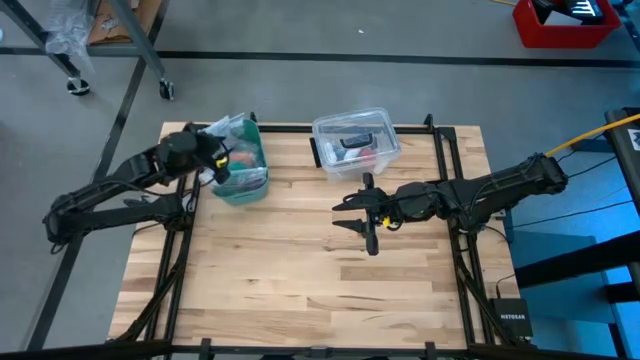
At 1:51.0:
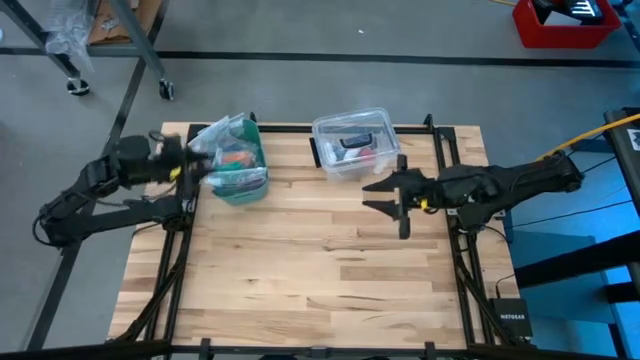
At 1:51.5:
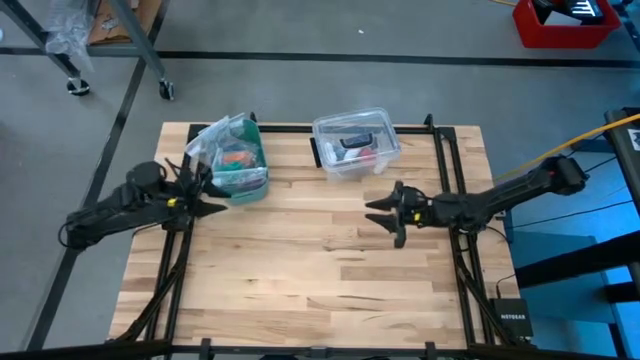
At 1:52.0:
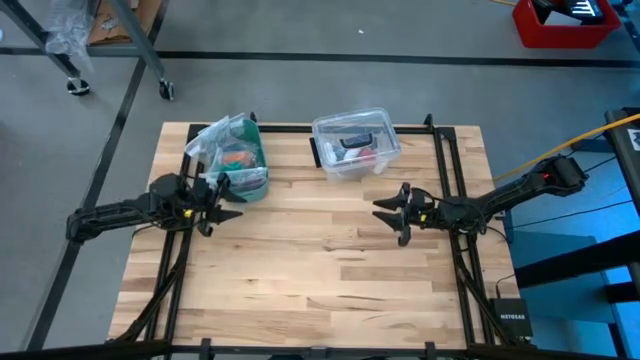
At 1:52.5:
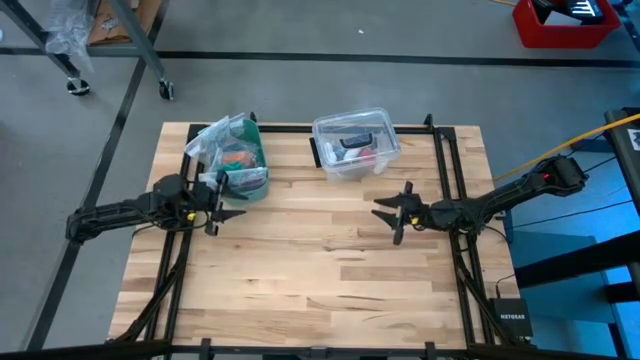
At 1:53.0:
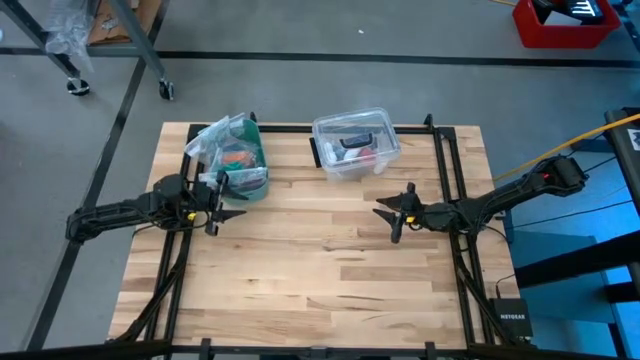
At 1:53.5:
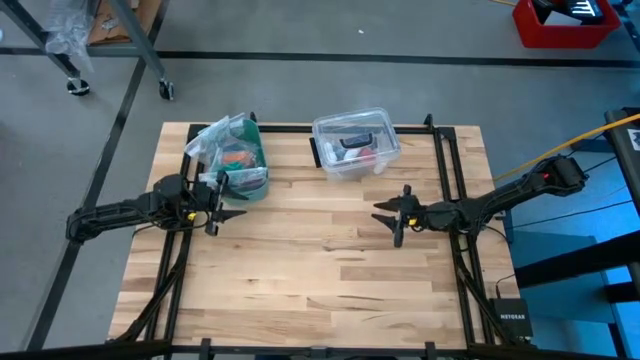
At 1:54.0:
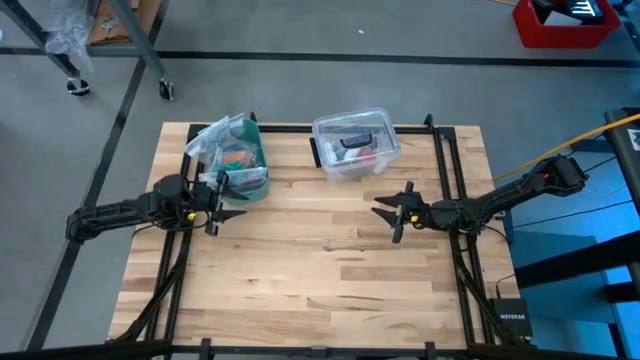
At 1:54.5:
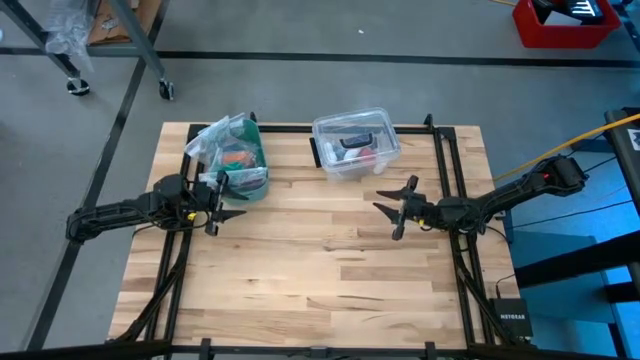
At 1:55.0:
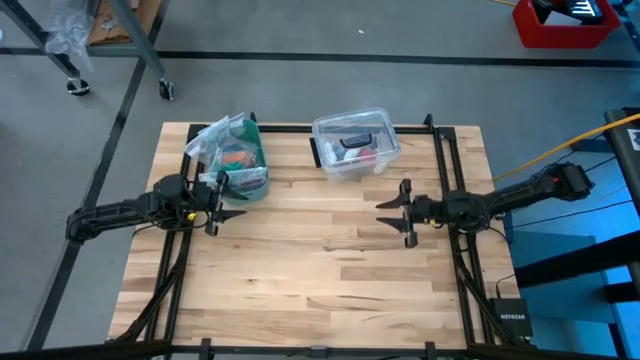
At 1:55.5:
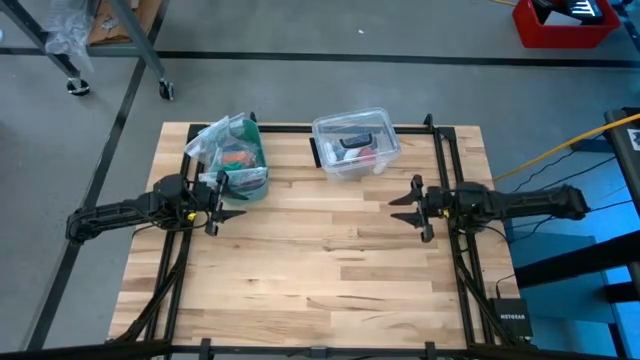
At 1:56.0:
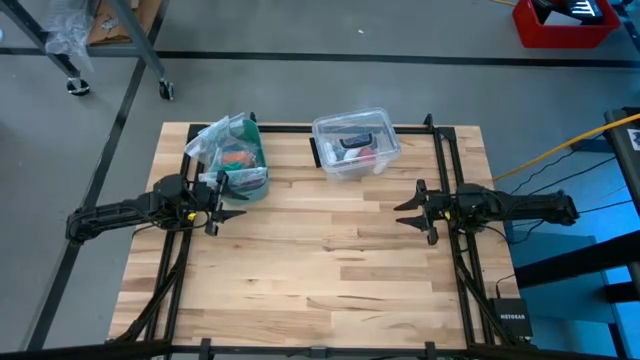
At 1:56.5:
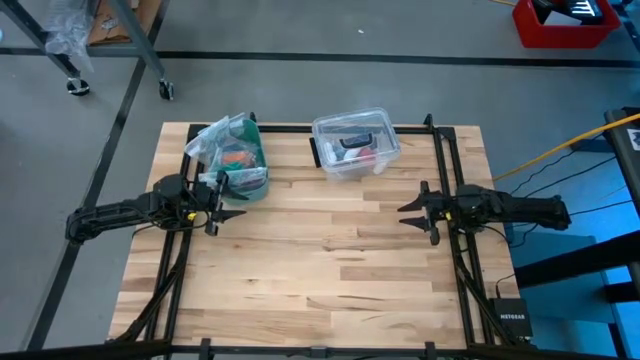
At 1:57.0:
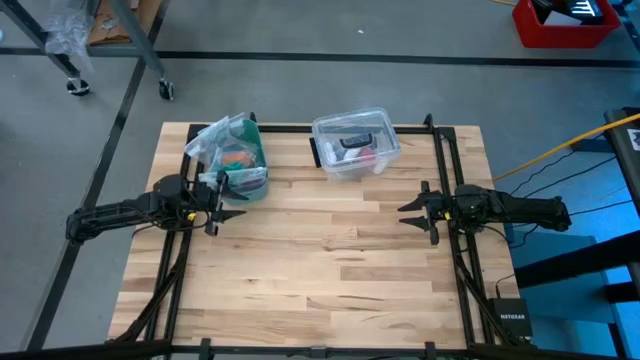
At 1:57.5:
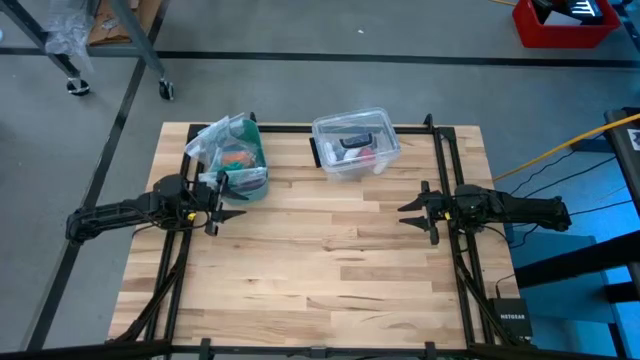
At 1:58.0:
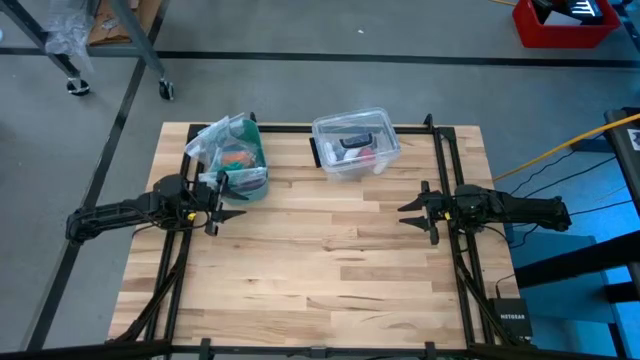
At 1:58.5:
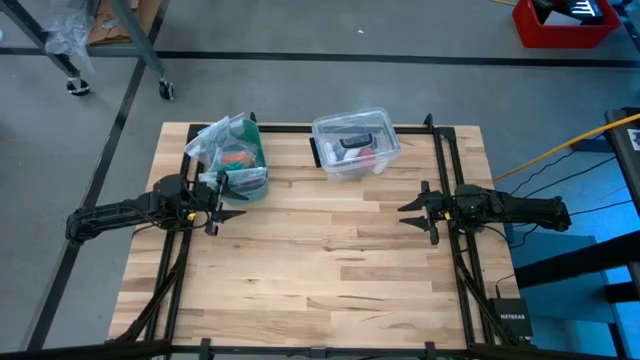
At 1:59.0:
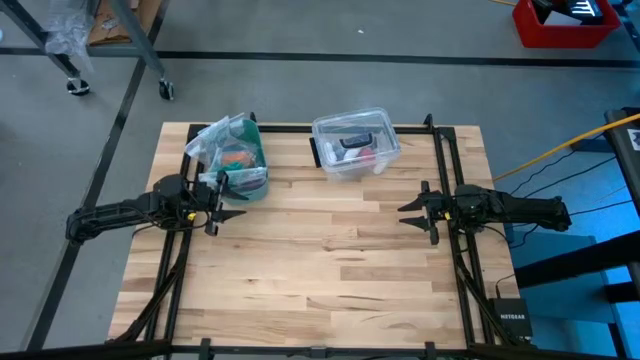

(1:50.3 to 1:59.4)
Task: Roll bandage
Return to Home Position

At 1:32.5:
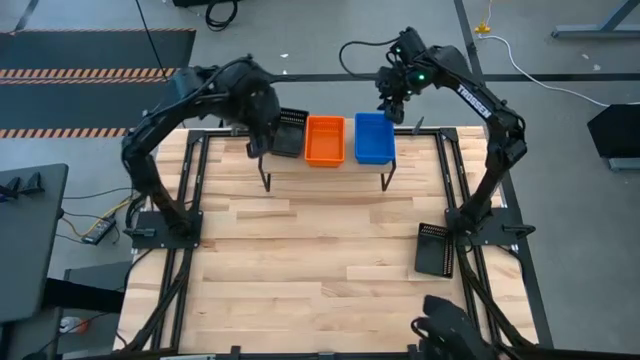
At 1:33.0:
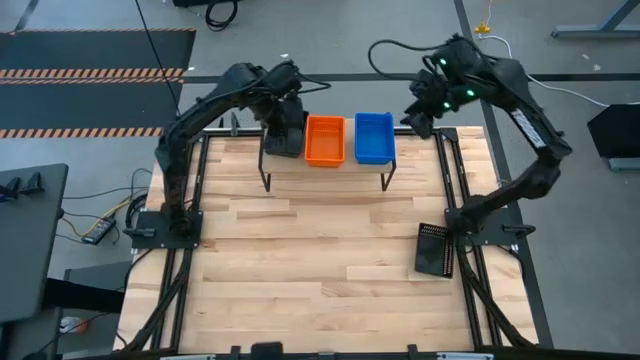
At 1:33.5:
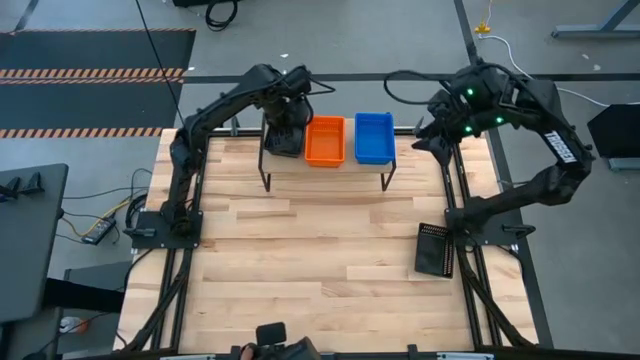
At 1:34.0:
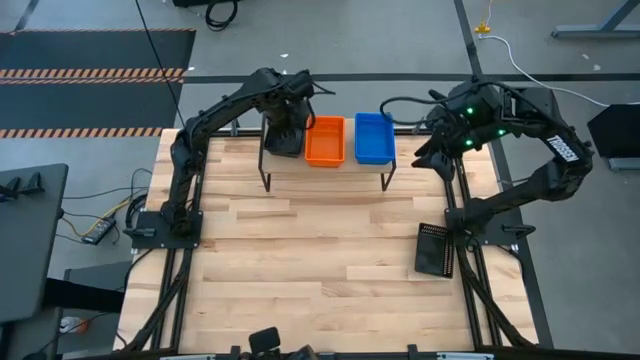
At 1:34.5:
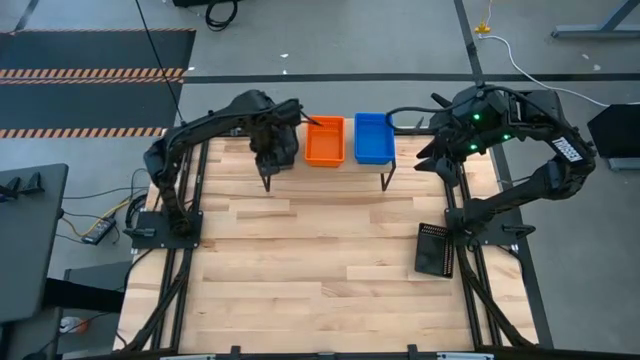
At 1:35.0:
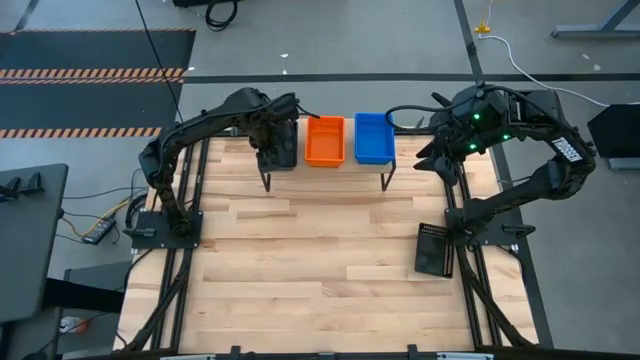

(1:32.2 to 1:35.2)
Task: Stack baskets on shelf by color
Adjust the black bins on the shelf

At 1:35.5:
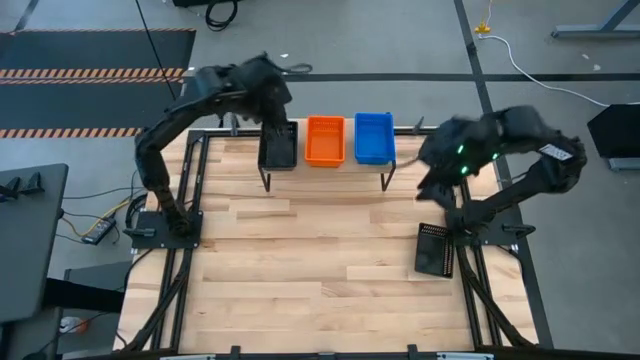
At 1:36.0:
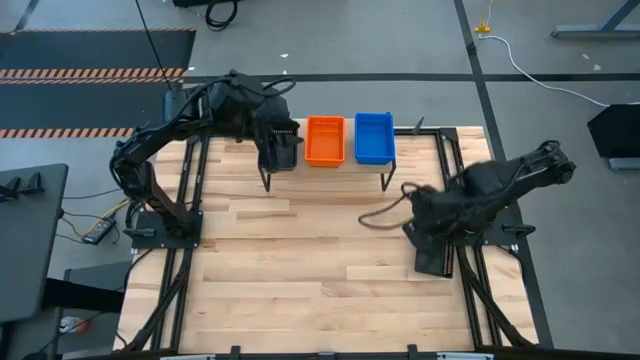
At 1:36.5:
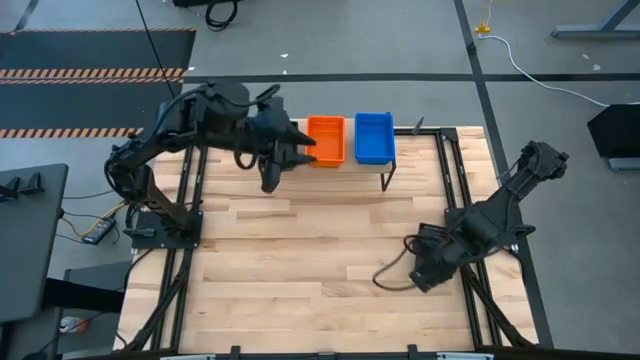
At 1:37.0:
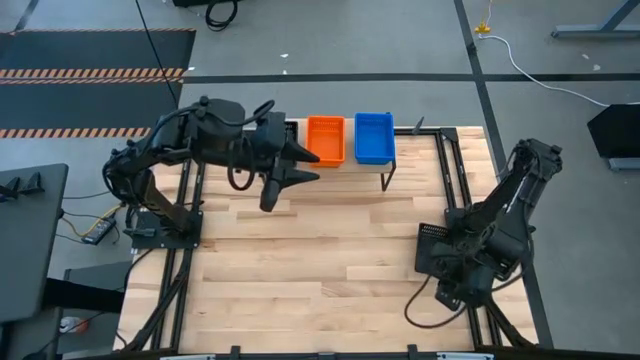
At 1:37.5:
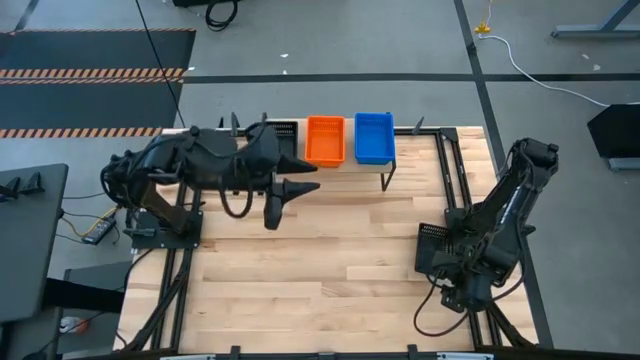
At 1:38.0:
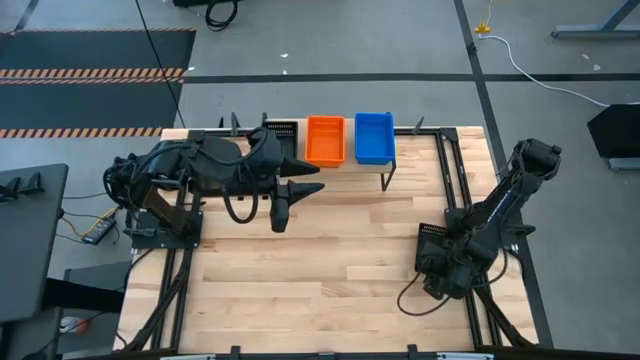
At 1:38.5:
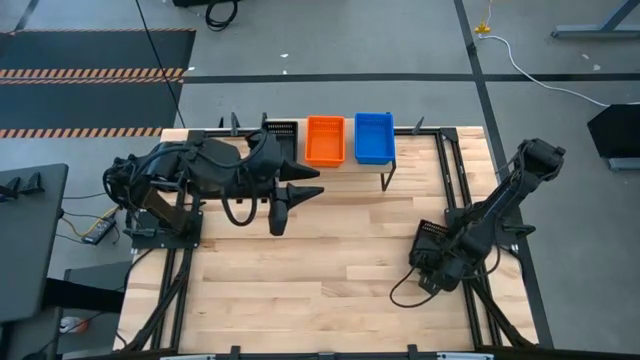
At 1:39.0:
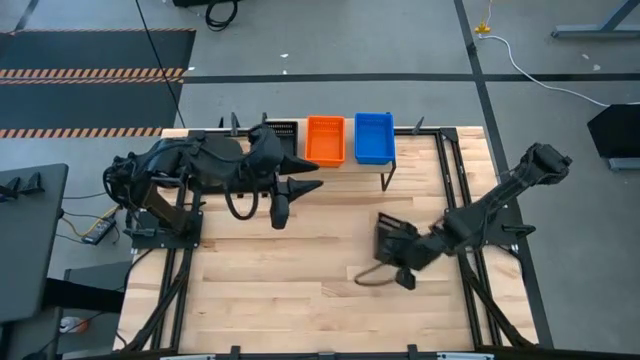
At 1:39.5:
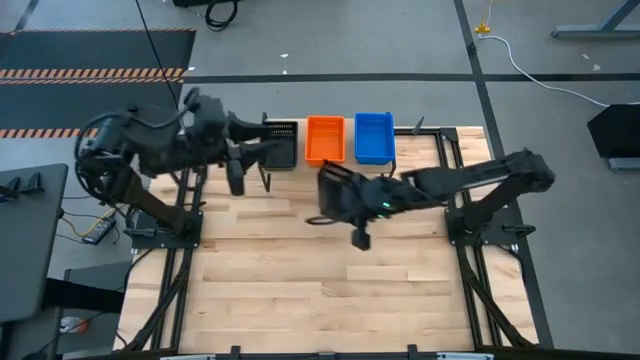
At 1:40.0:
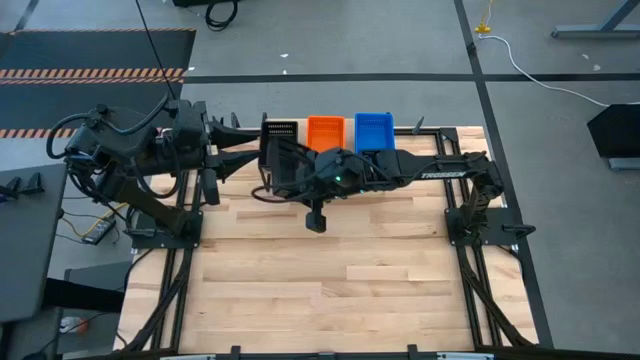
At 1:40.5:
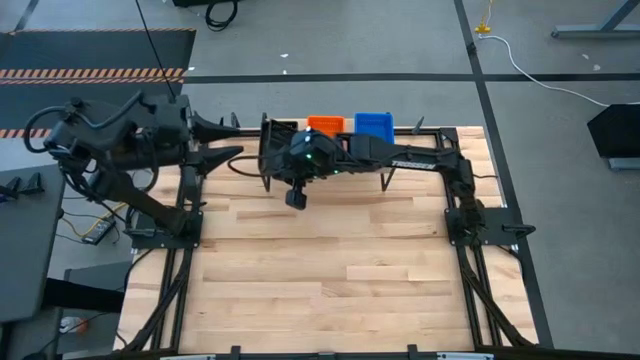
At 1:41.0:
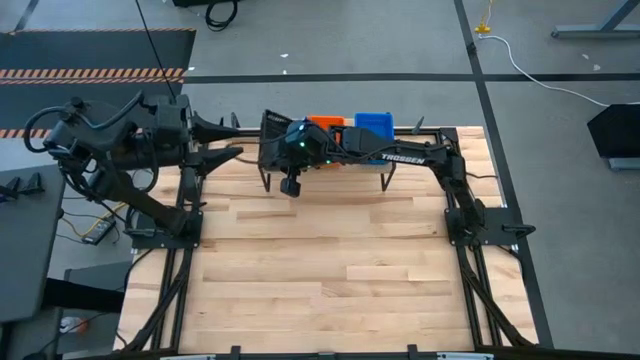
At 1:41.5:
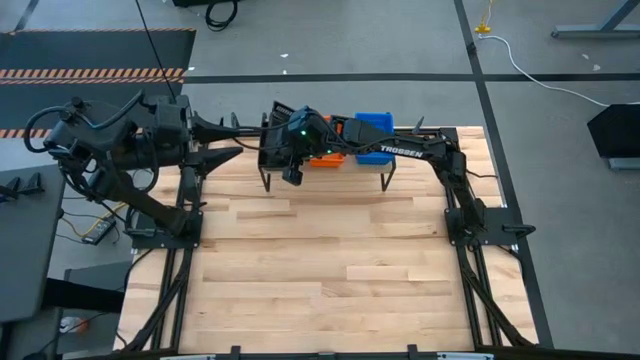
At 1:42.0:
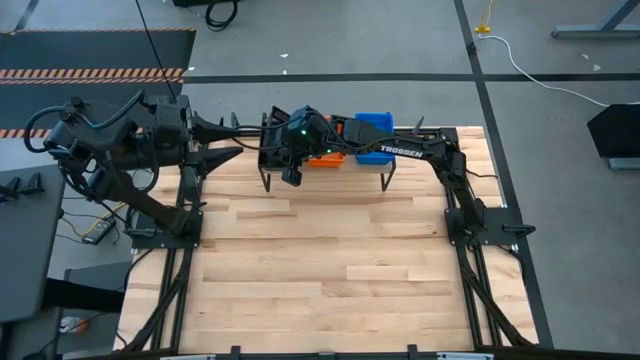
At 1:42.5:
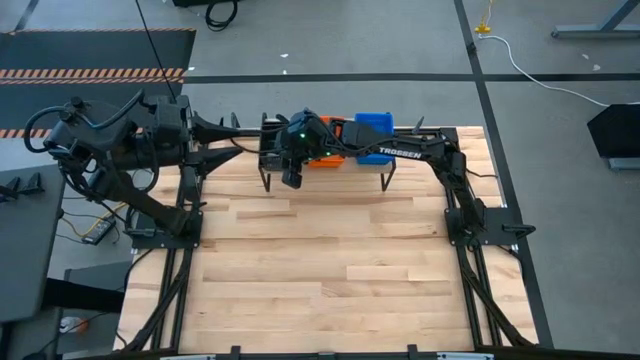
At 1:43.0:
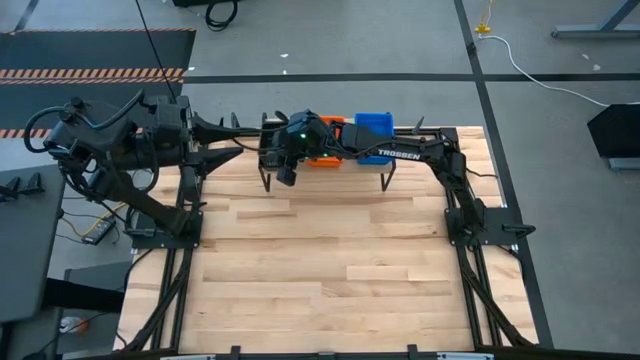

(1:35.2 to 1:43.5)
Stack the black bin on top of the black bin on the shelf
